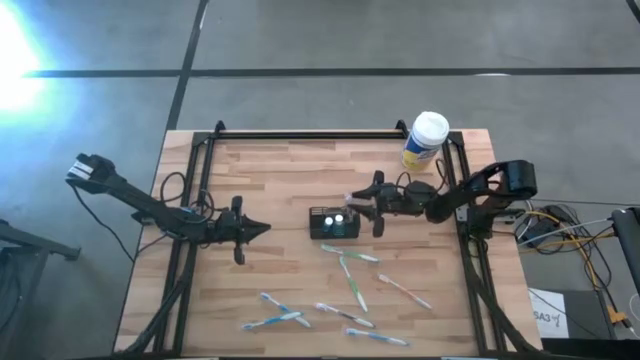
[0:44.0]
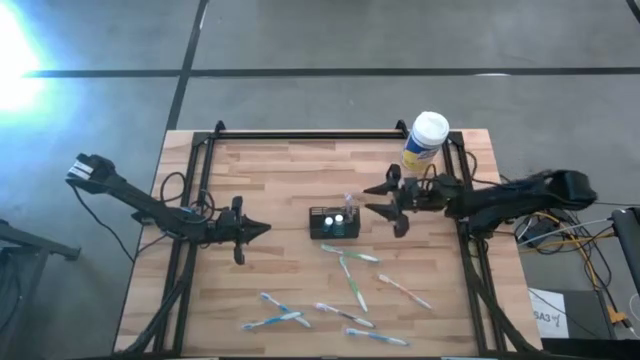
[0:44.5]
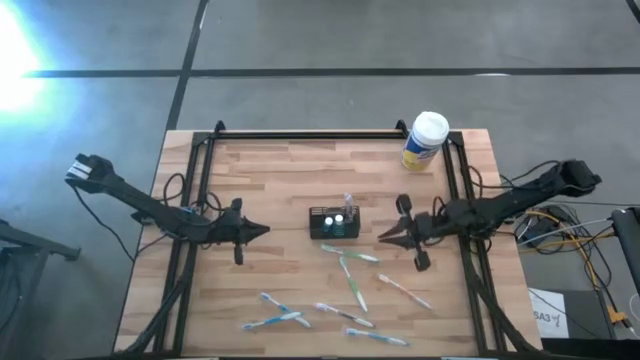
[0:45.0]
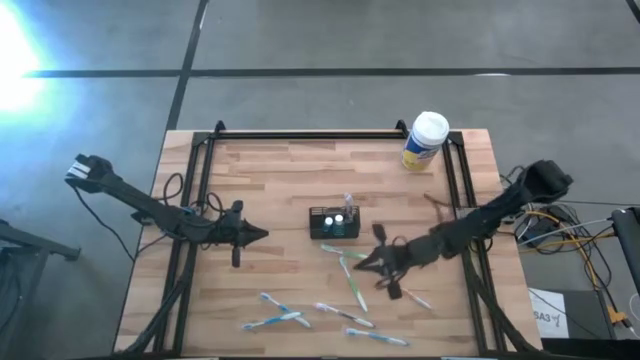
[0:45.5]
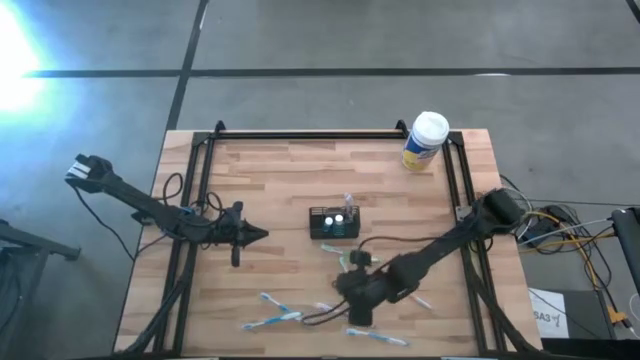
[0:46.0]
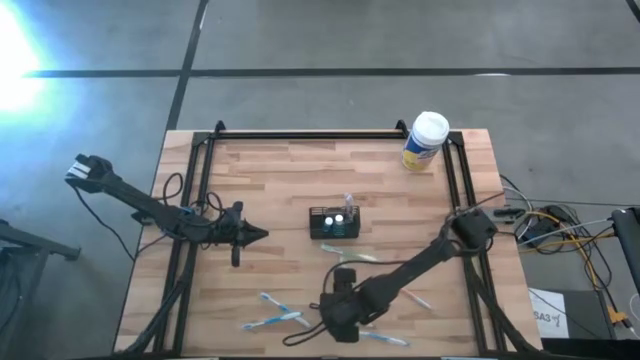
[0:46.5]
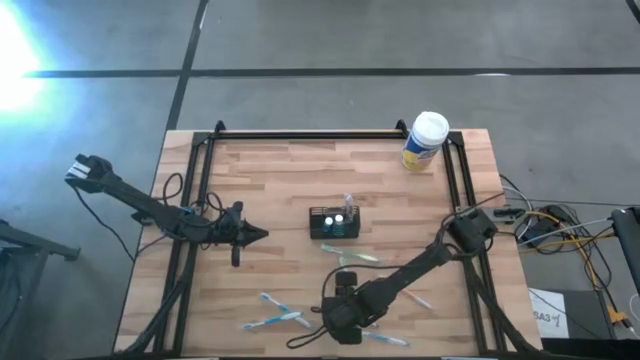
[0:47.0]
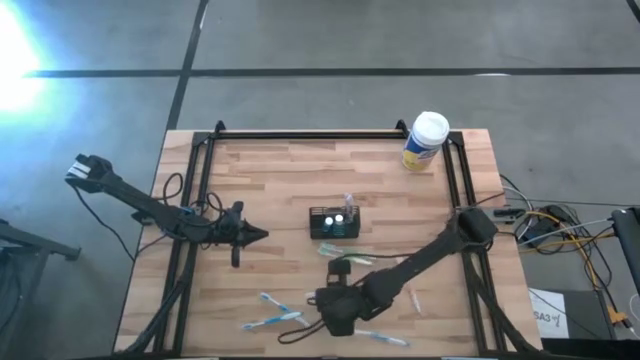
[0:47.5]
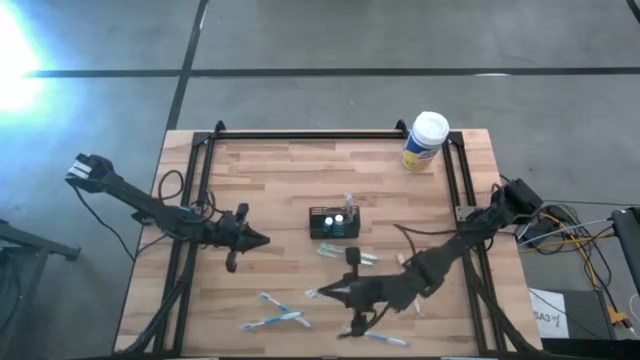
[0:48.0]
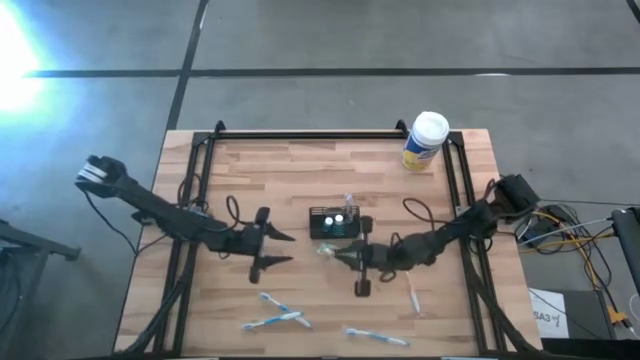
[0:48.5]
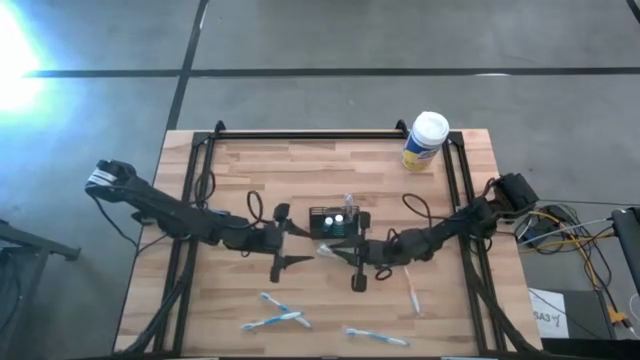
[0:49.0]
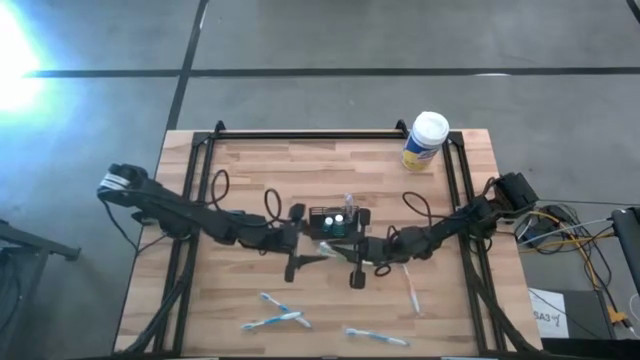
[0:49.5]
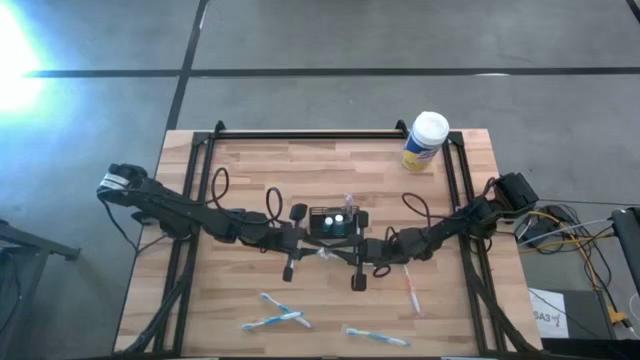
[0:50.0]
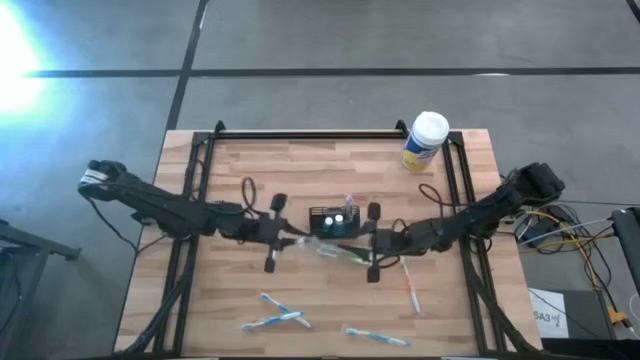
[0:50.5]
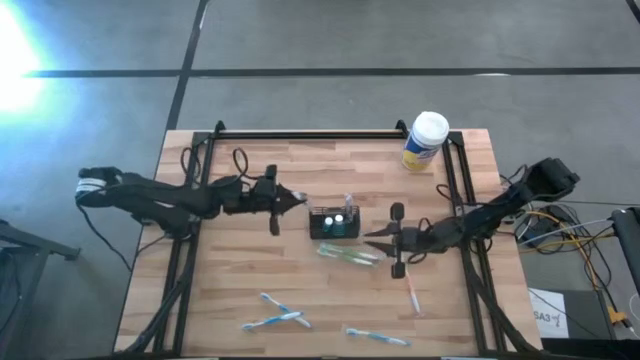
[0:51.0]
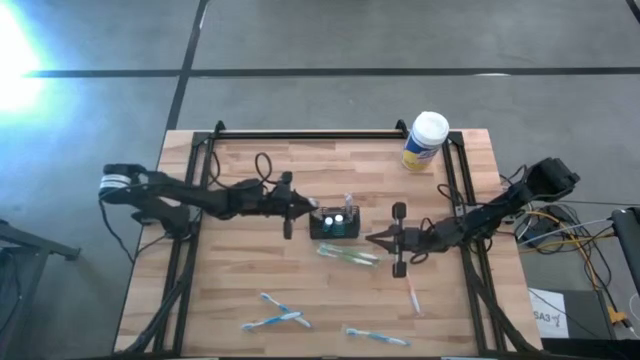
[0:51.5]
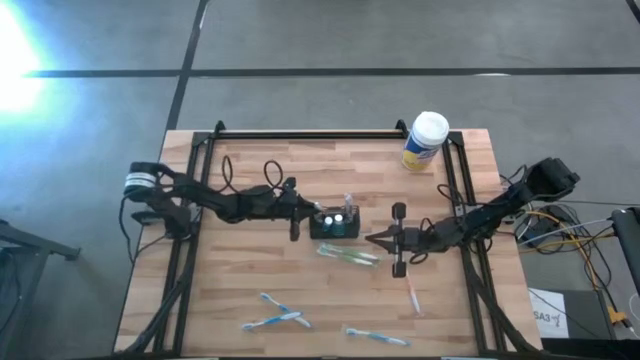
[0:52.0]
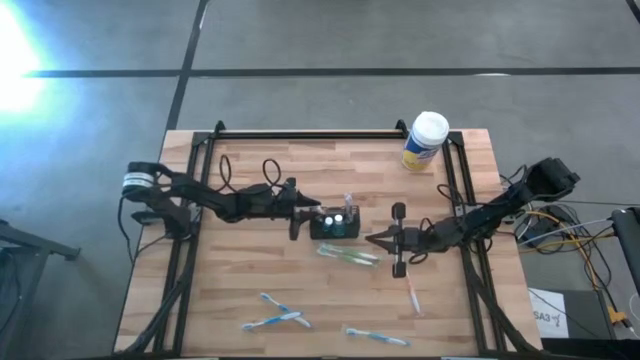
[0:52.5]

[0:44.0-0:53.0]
Task: Pick & Place toothbrushing station
Put the violet toothbrush into the black organizer

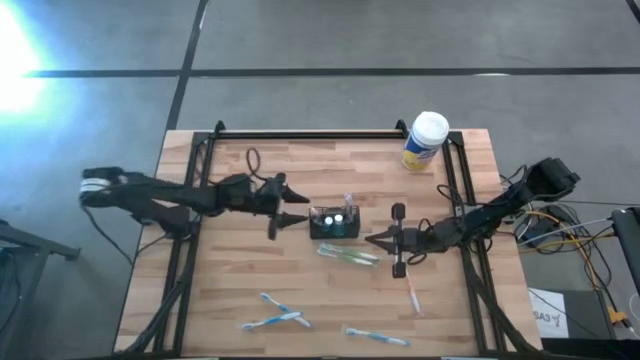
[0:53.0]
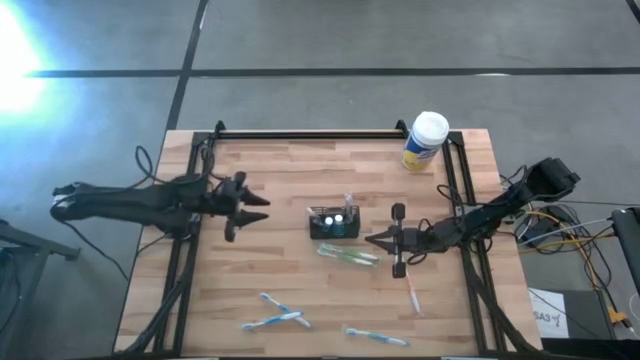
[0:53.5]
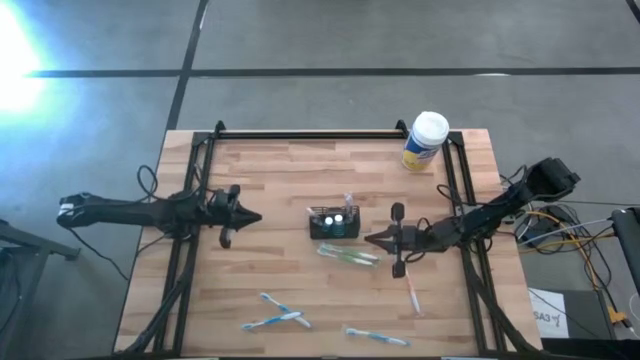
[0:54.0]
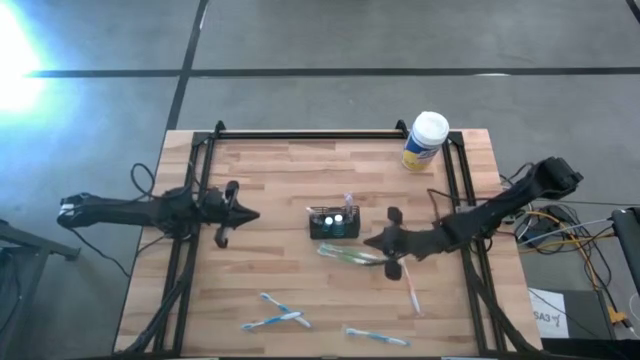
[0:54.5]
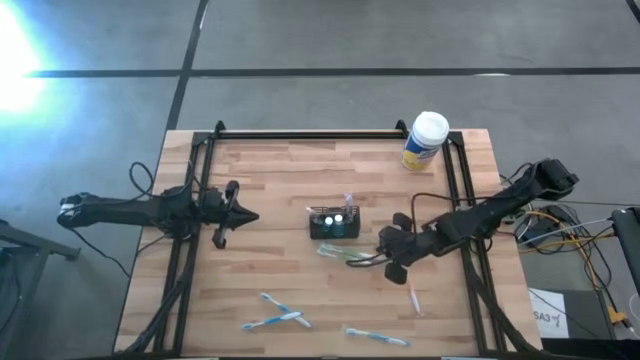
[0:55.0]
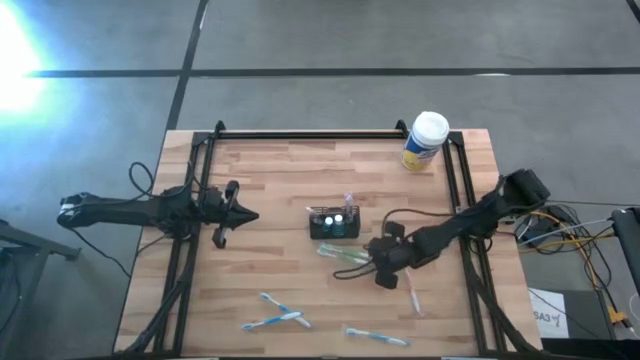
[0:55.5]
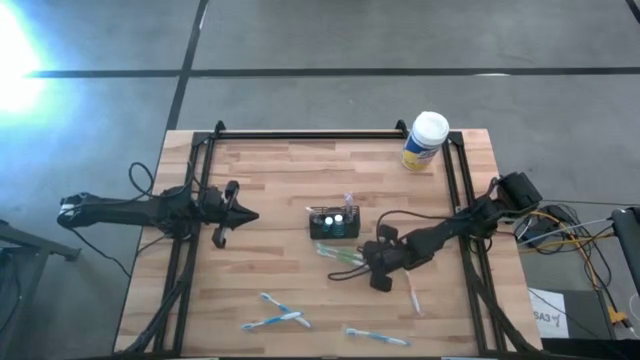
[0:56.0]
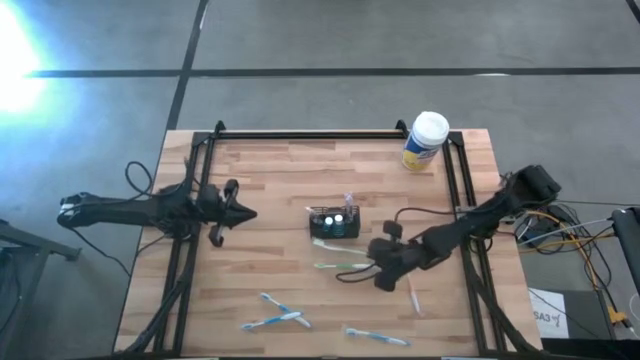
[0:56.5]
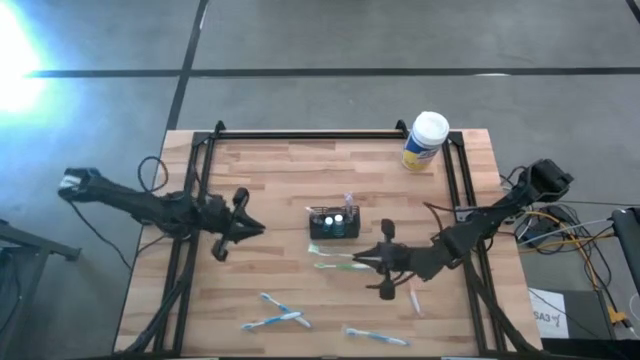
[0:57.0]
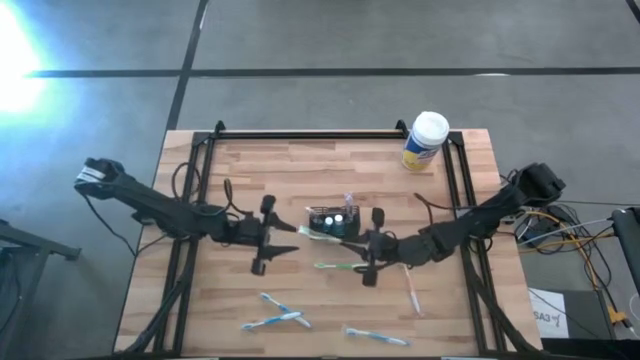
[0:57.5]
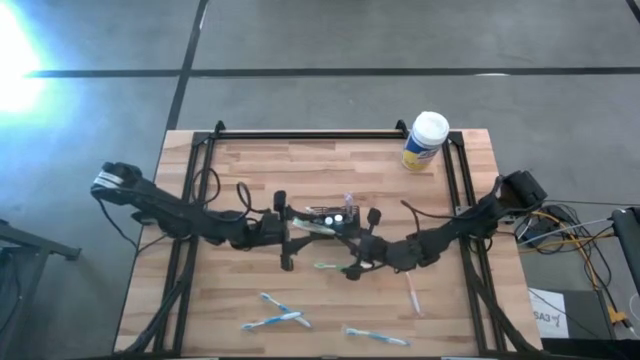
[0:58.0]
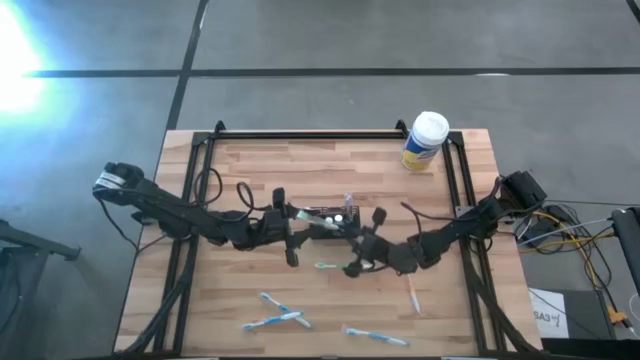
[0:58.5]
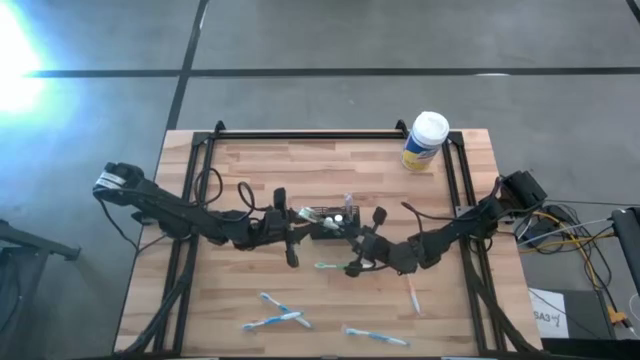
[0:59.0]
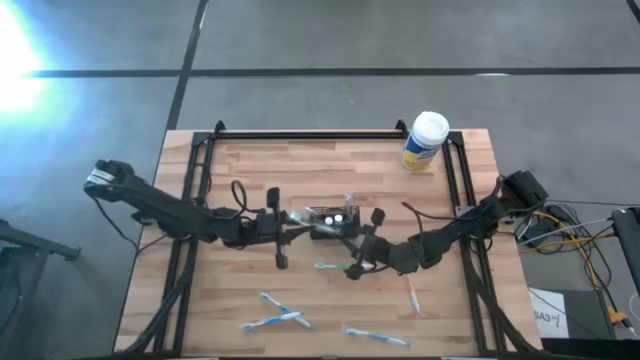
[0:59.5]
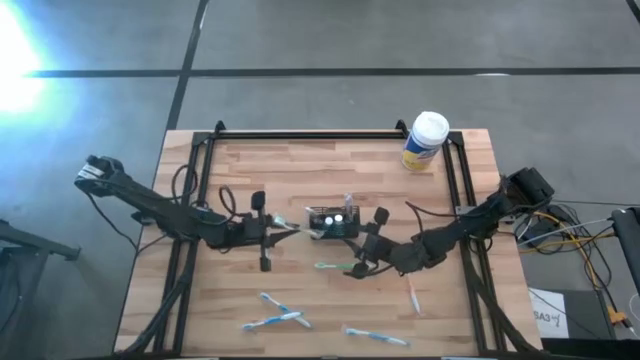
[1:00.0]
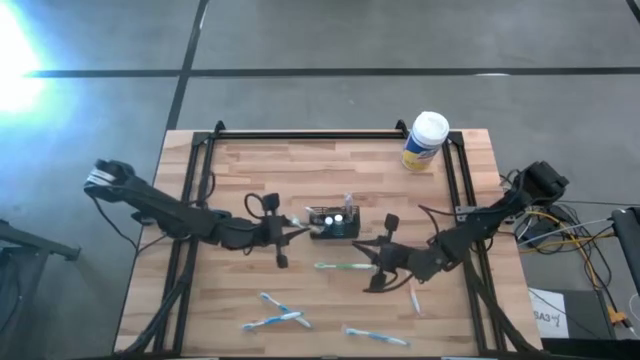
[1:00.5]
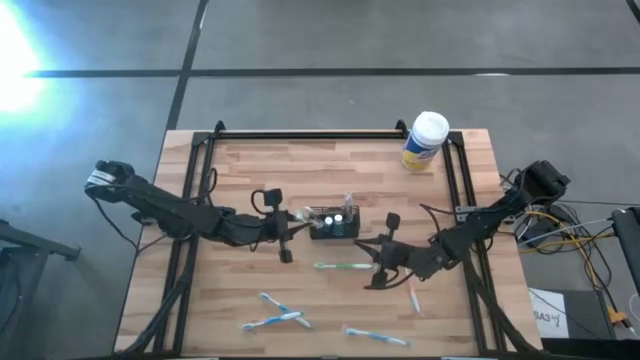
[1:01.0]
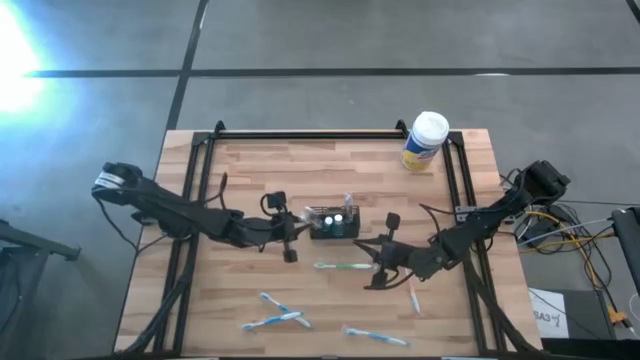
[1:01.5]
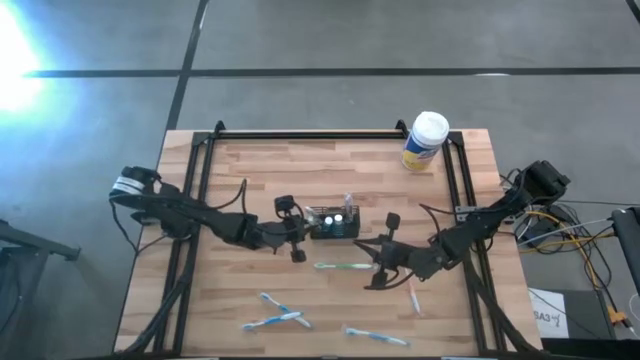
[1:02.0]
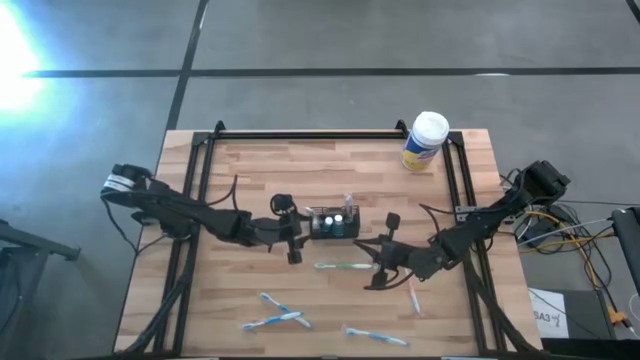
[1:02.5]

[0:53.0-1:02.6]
Put the top green toothbrush into the black organizer

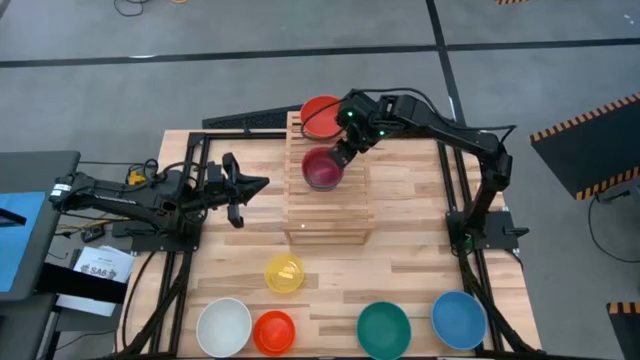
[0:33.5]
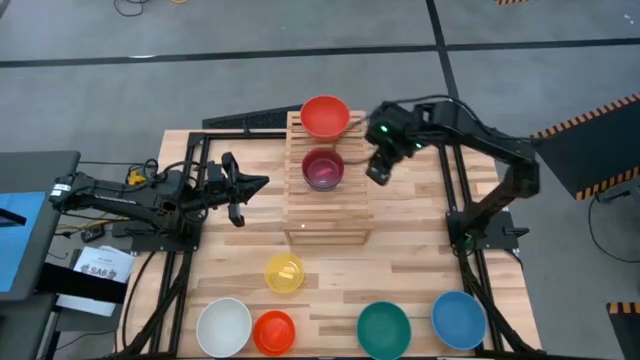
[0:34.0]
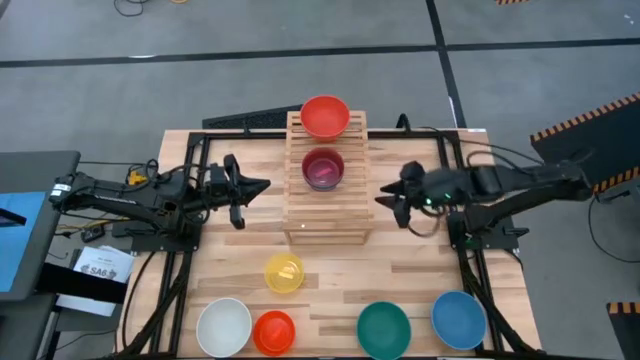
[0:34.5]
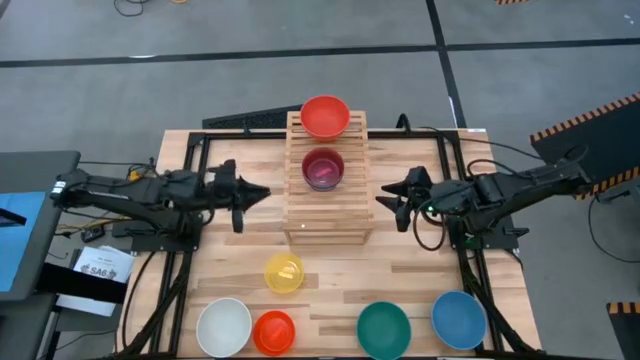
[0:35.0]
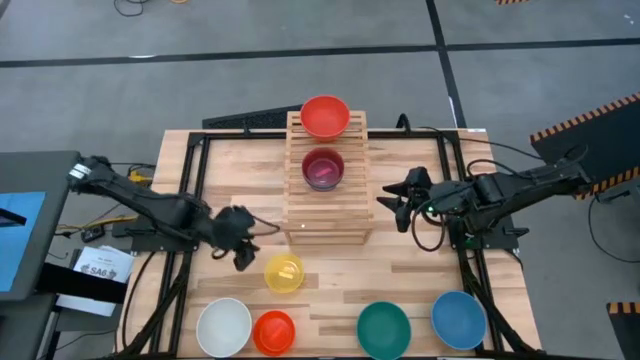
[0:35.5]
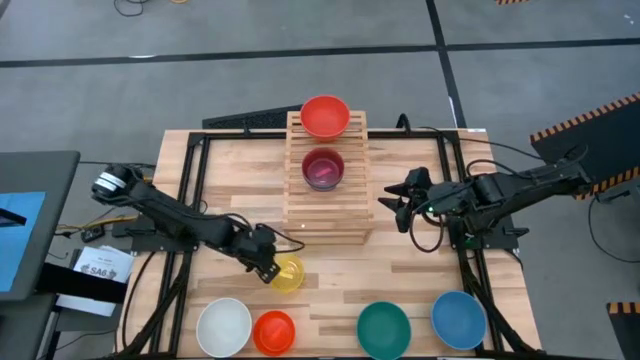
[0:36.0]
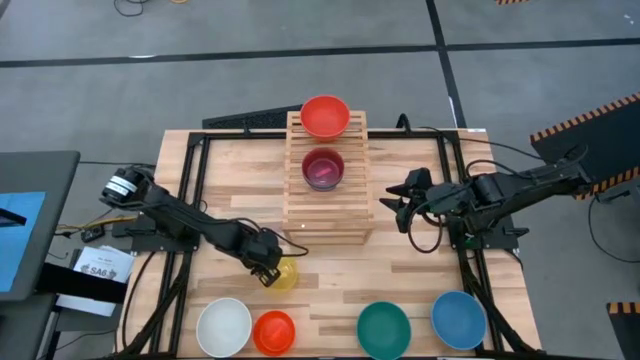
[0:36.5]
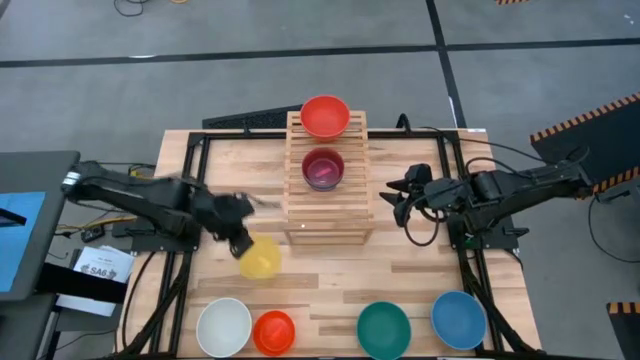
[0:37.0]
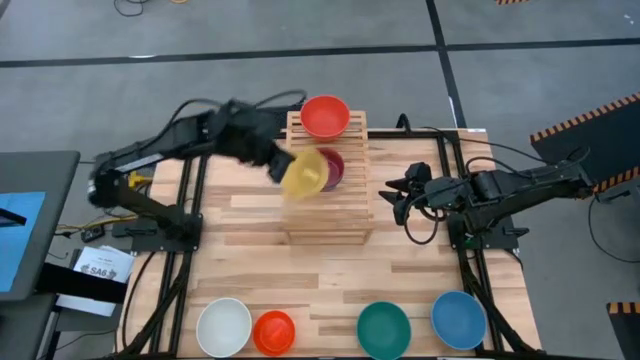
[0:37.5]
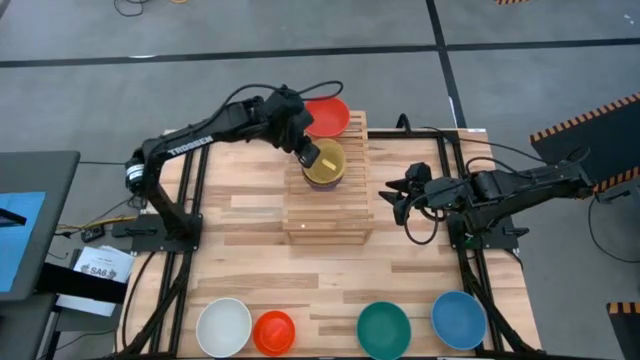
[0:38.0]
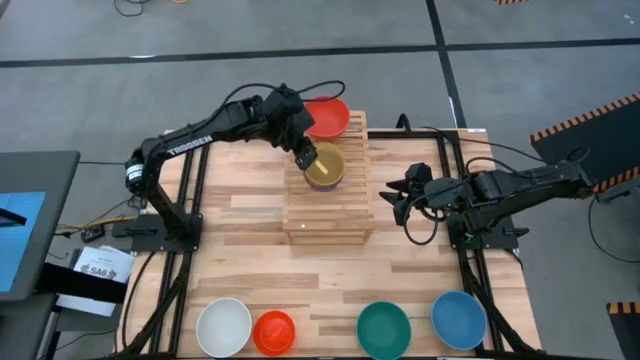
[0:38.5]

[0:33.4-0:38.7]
Task: Place and stack bowls onto a shelf
Stack the small yellow bowl on top of the small red bowl on the shelf
